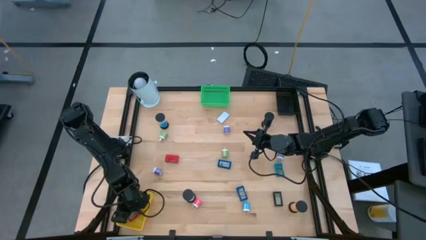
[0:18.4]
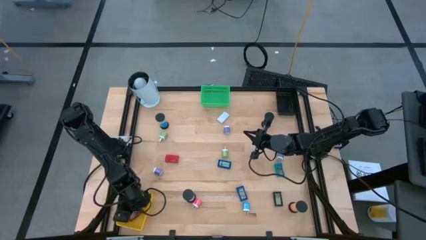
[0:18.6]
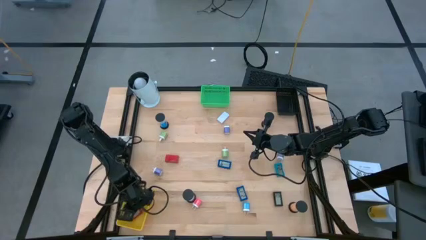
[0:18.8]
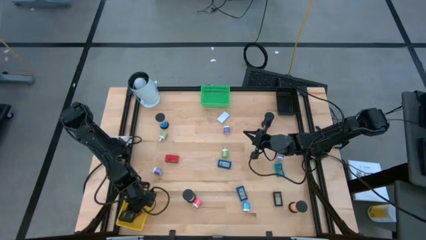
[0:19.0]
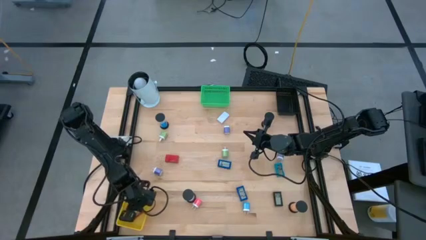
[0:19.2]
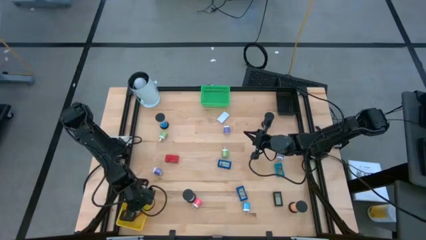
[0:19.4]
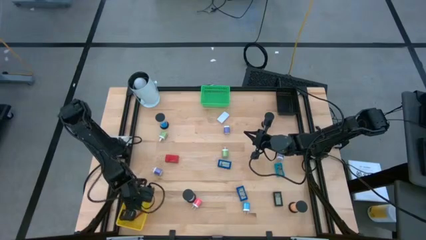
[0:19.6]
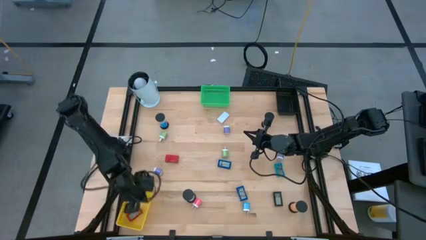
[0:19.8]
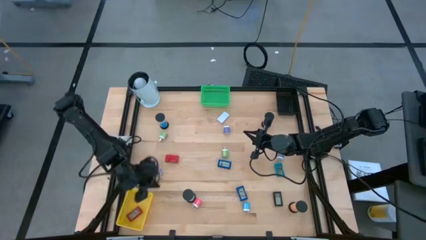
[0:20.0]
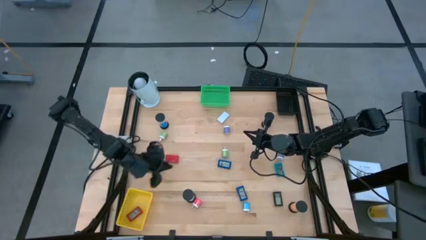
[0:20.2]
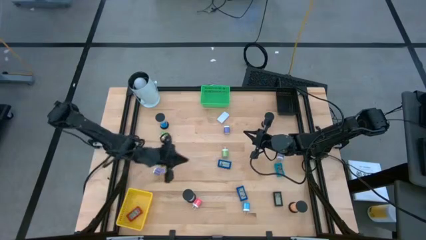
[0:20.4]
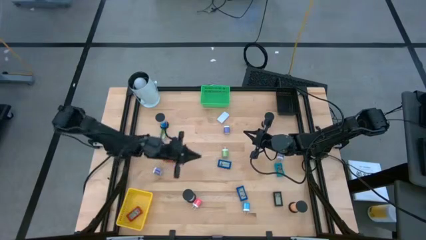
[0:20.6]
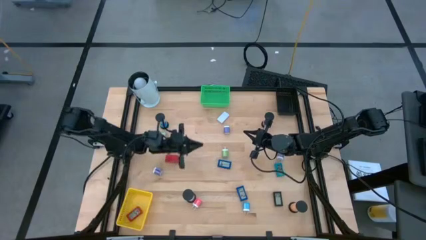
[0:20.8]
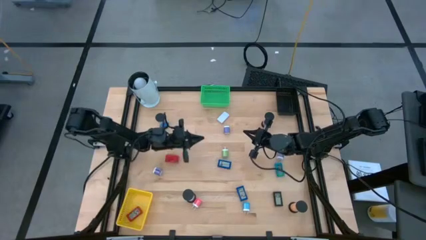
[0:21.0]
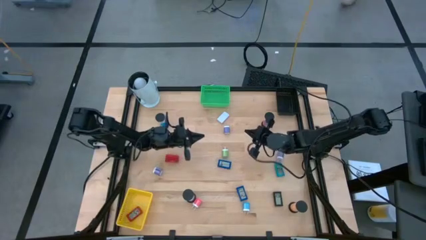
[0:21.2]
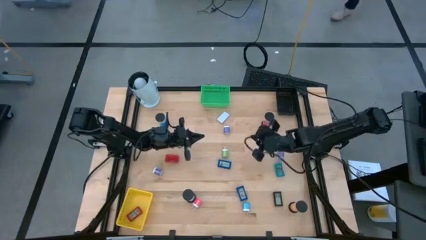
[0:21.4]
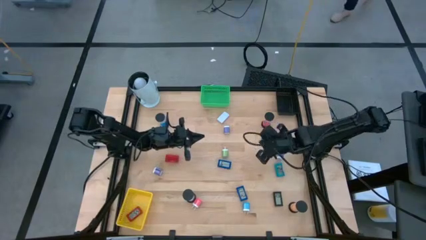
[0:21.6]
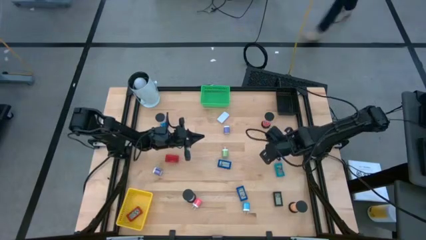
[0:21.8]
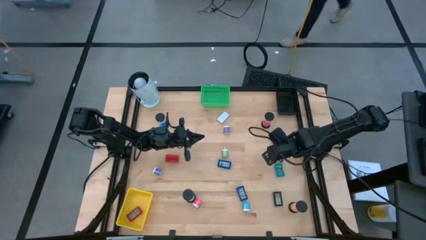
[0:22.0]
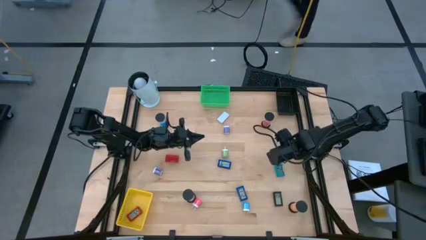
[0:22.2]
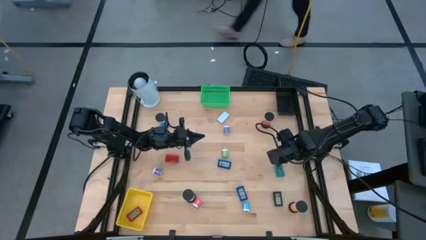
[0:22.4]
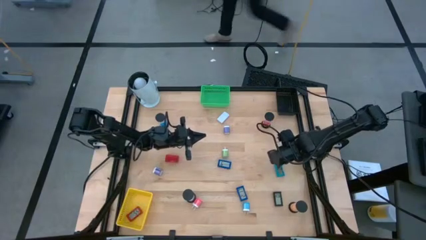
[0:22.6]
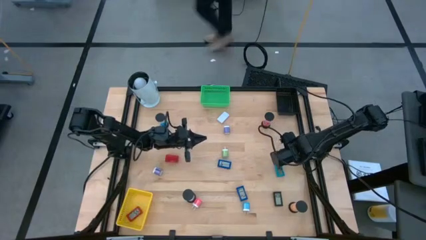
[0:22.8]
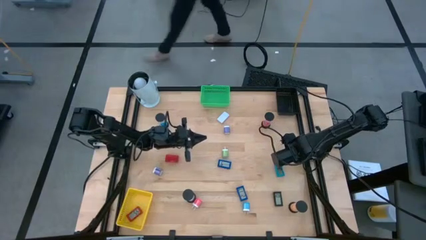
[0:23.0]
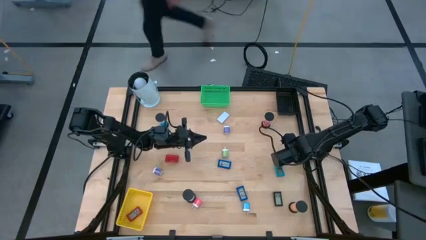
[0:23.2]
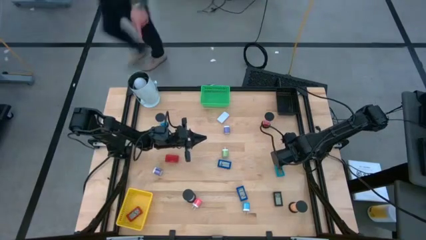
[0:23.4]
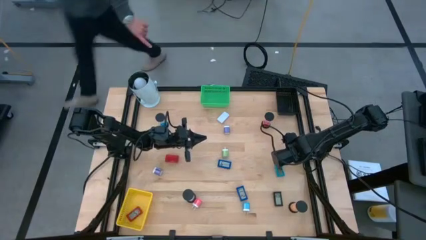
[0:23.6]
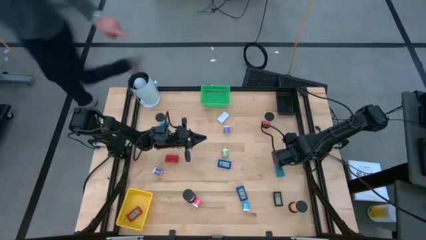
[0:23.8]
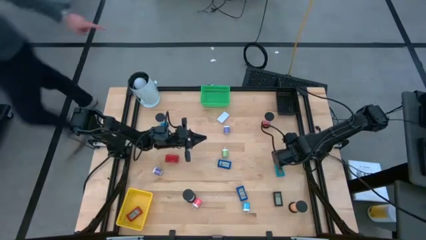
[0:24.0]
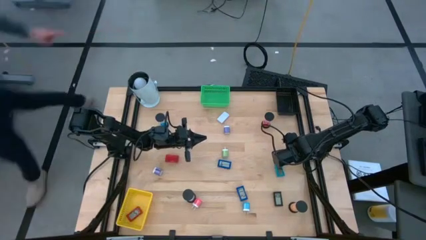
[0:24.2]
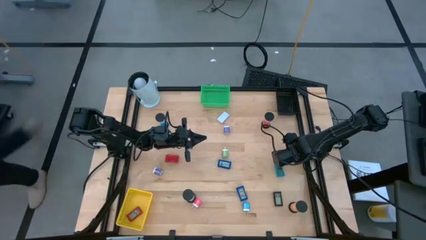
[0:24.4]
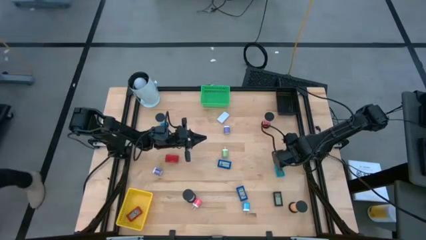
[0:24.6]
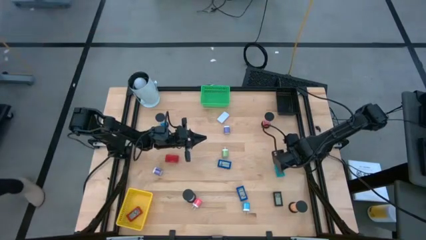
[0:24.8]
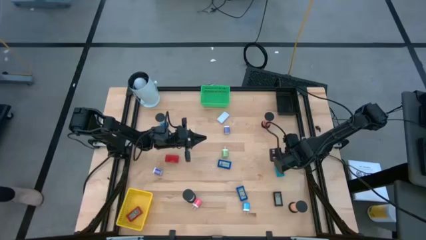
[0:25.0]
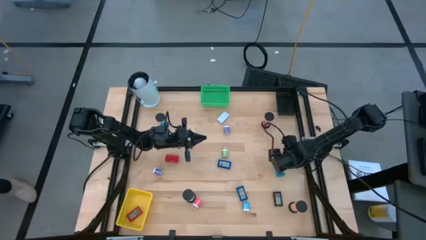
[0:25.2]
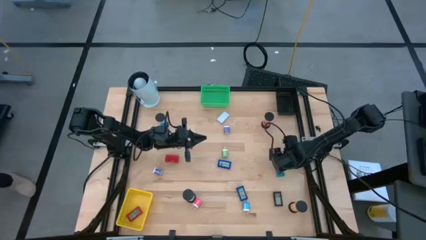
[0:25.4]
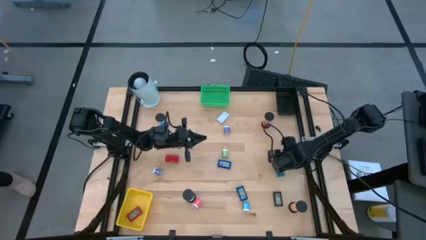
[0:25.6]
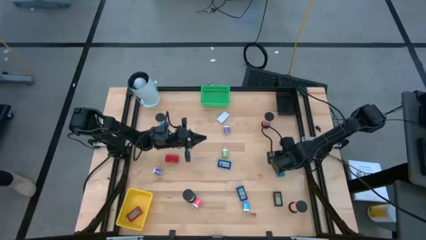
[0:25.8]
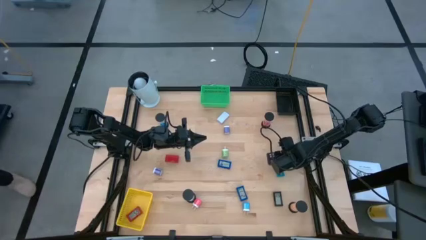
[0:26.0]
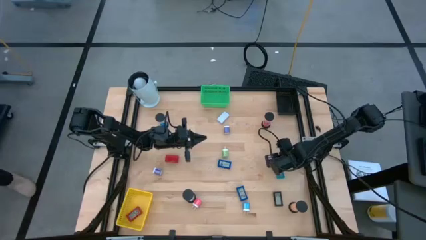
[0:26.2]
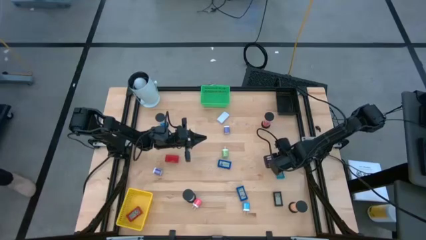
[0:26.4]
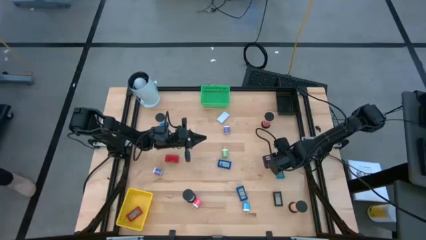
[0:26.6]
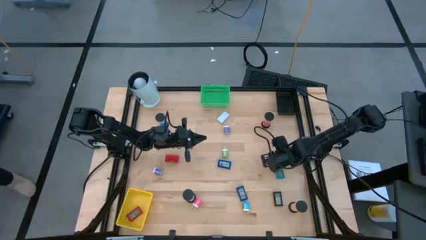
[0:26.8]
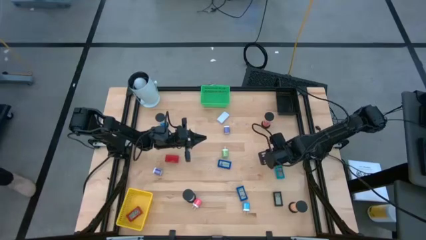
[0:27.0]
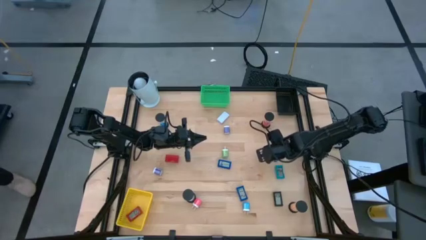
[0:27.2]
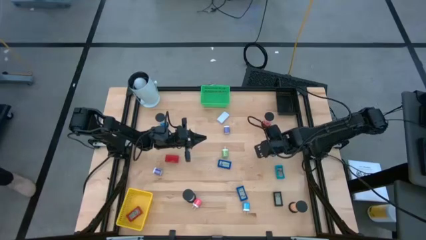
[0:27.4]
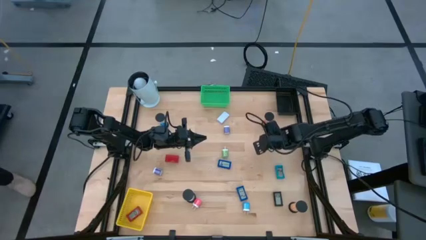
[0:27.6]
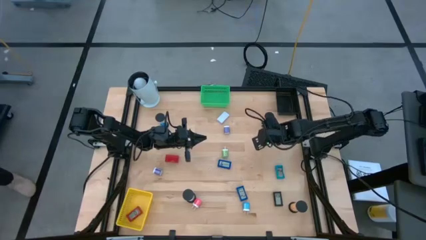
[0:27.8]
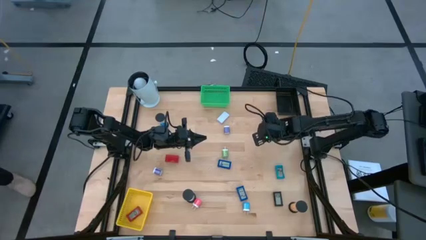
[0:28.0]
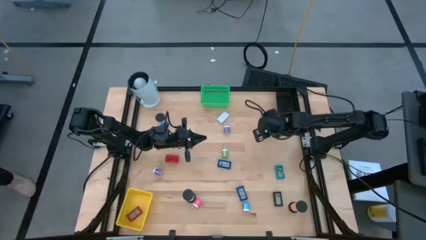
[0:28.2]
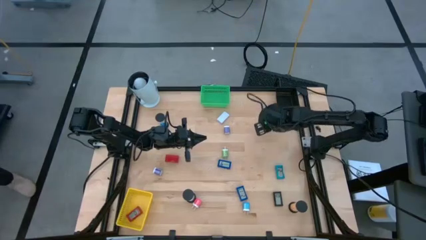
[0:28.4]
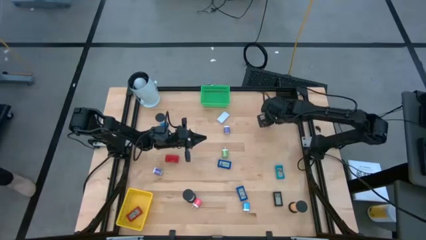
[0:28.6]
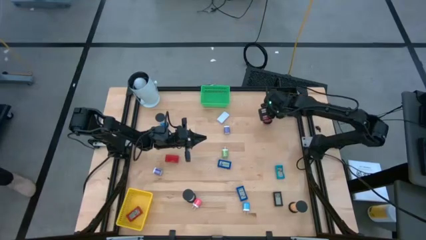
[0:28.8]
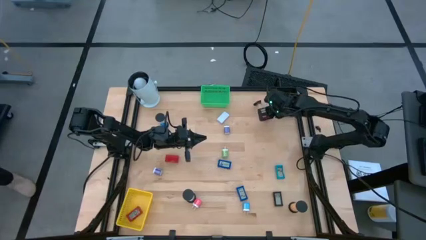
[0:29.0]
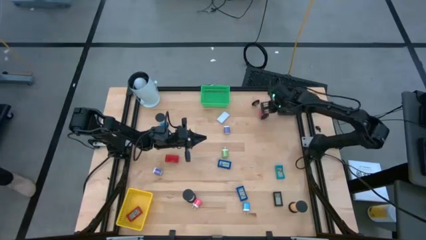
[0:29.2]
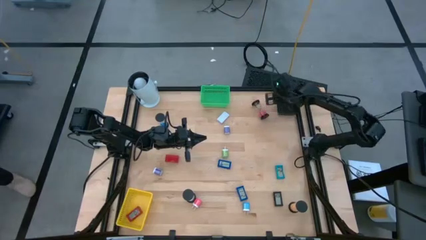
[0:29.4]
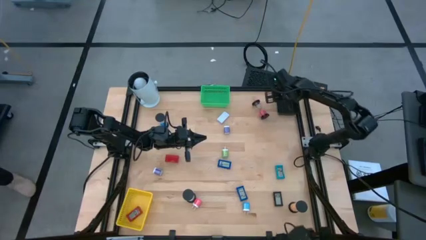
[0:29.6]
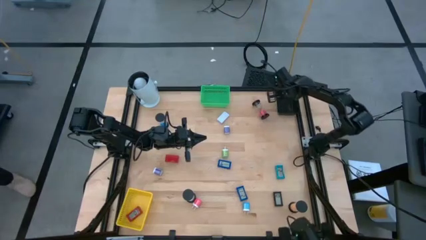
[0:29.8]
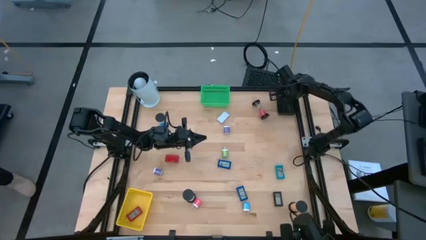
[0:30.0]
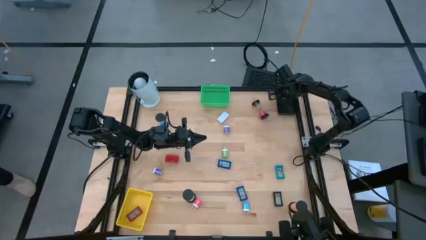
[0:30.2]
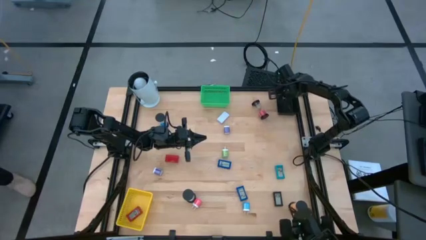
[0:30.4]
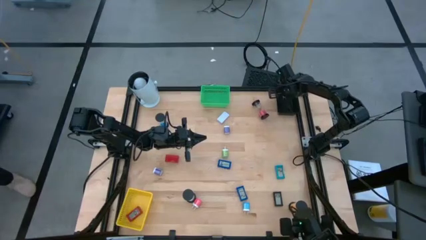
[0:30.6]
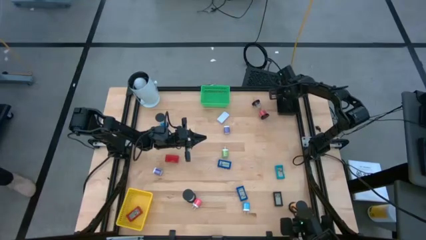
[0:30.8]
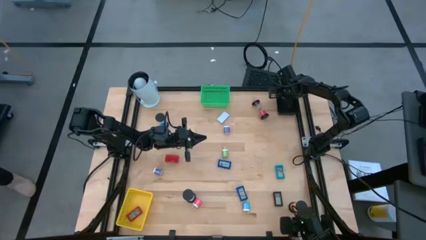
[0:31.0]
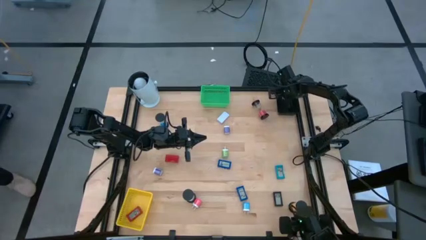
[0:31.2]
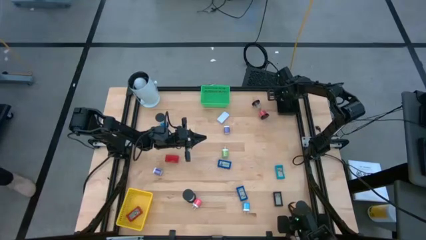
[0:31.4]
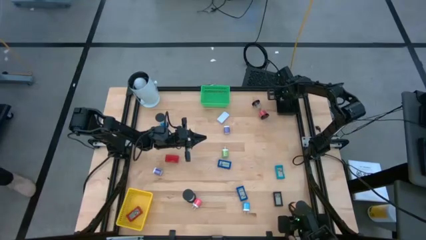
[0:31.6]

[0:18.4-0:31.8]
Task: Pick & Place Office items
Put the right purple adapter into the black basket
